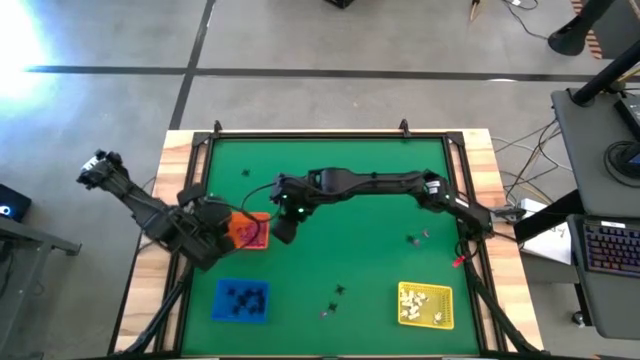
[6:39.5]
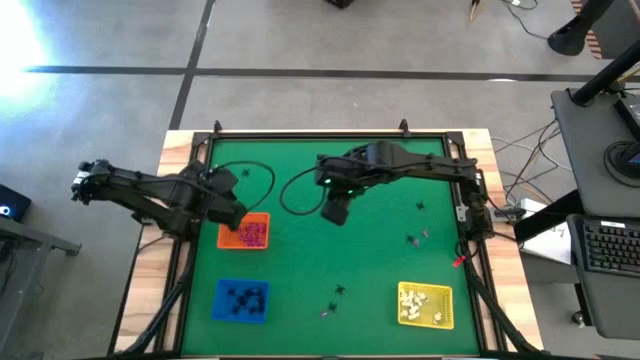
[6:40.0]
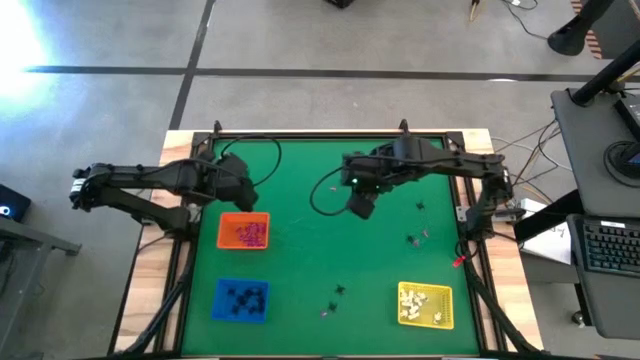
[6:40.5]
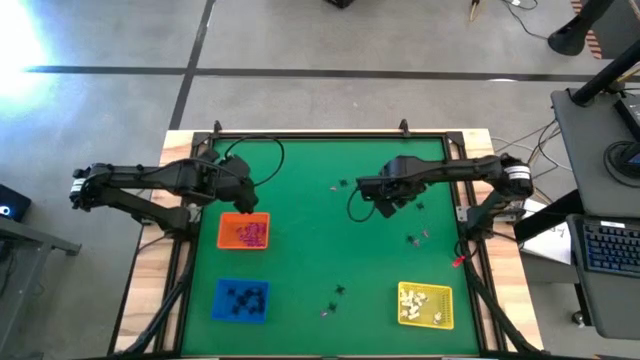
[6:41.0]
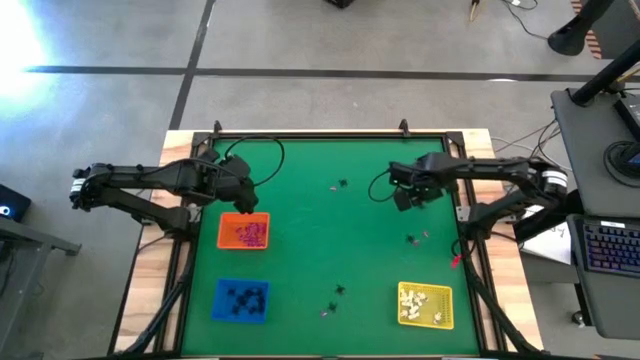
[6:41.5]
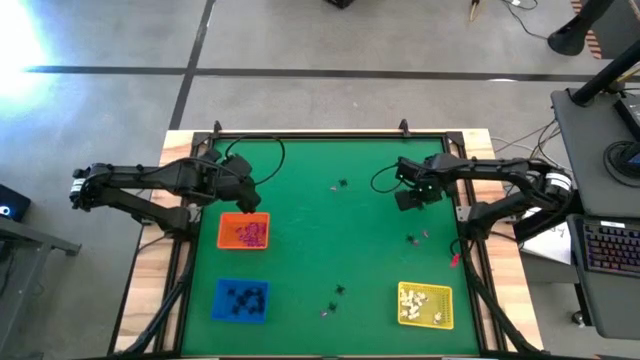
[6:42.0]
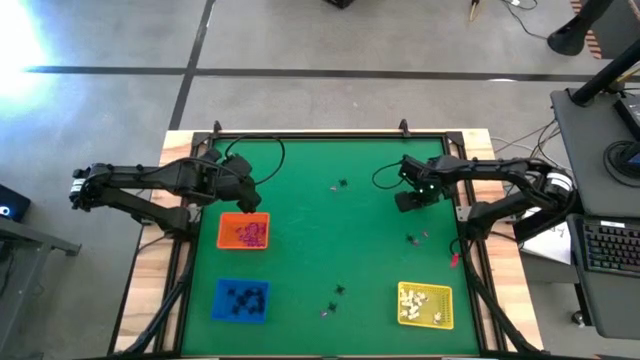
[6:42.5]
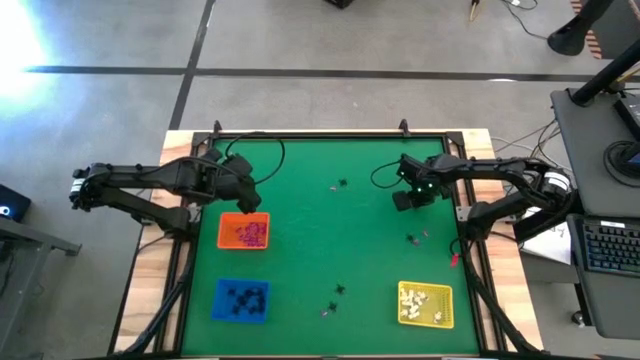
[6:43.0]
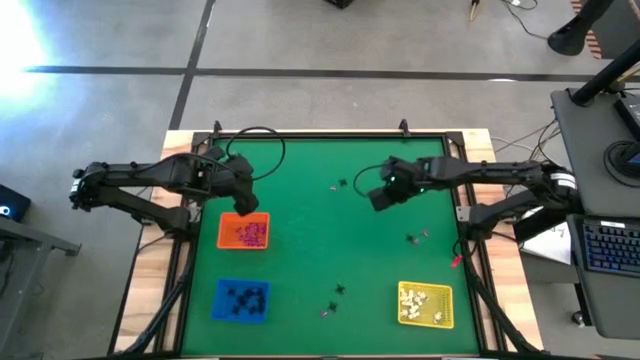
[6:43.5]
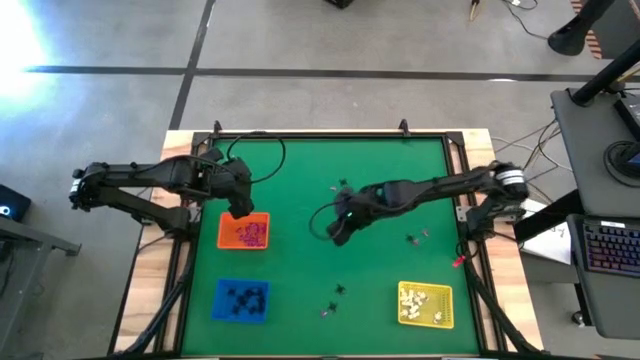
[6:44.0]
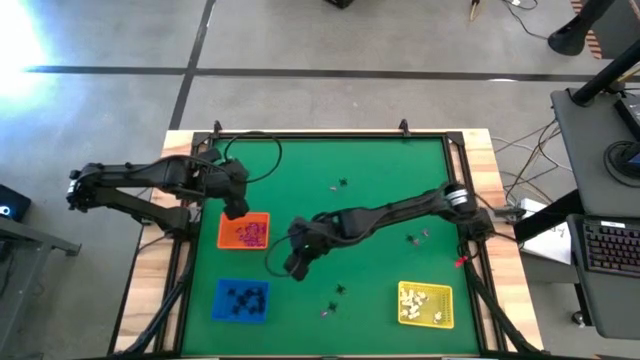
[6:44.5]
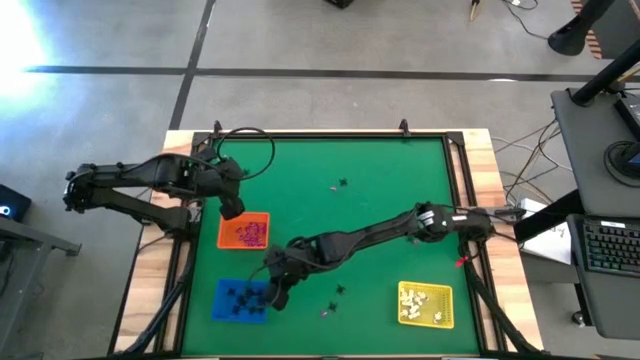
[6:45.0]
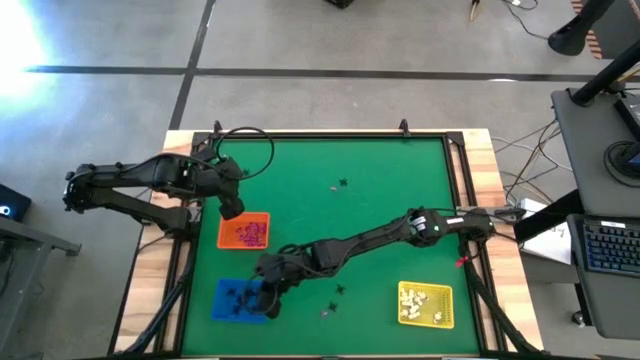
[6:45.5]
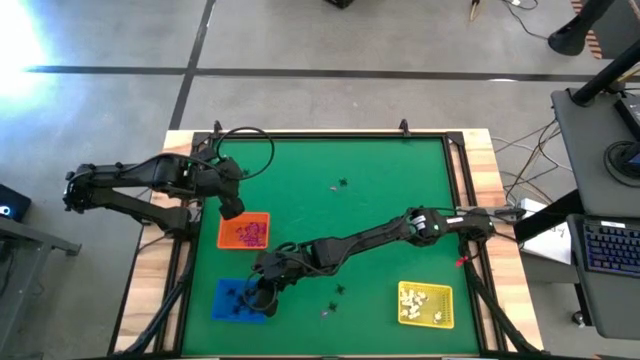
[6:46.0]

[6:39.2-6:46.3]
Task: Sort Halloween decoration
Put the black spider toy into the blue bin

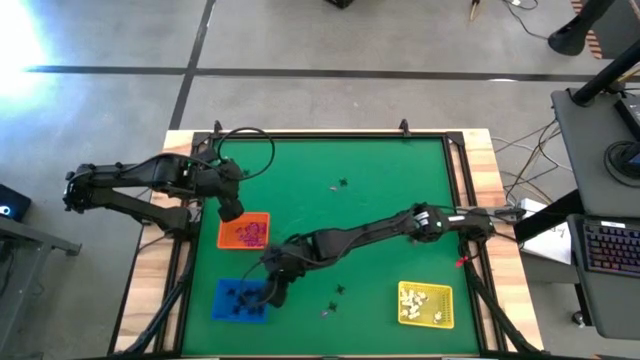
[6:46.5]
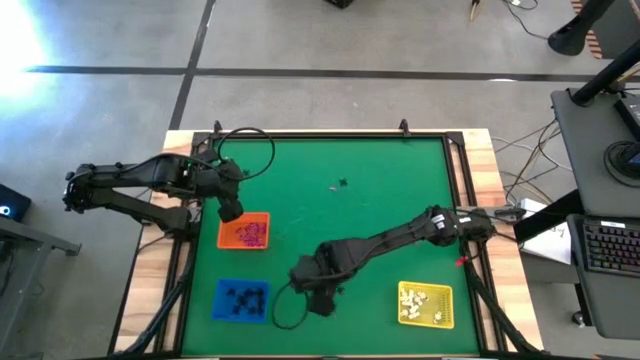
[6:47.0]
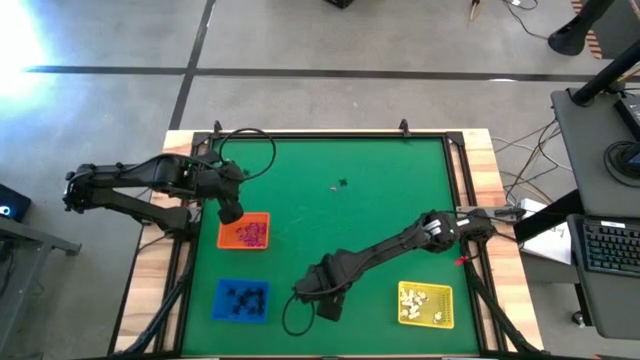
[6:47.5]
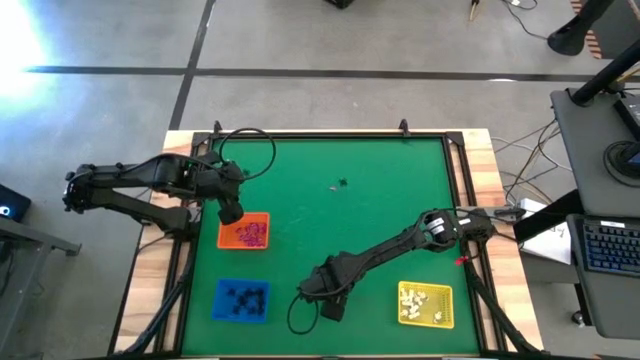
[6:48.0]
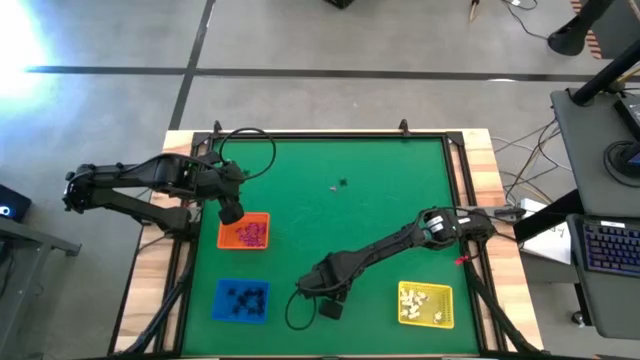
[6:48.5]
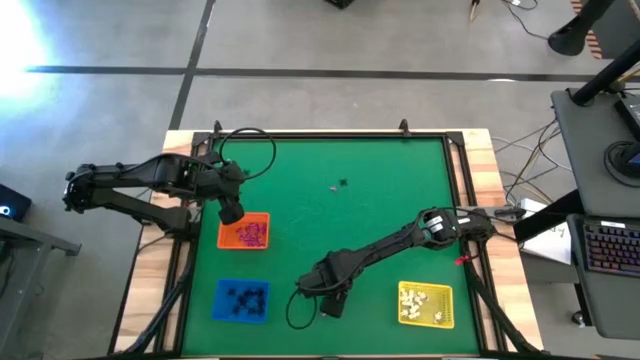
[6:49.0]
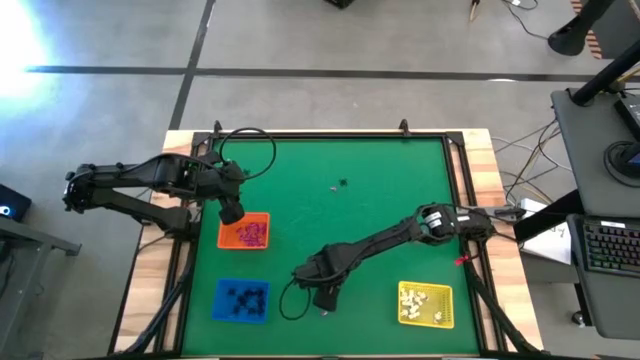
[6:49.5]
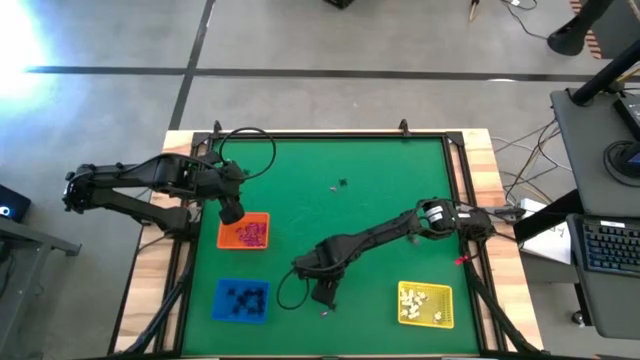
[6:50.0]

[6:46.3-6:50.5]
Put the black spider toy into the blue bin

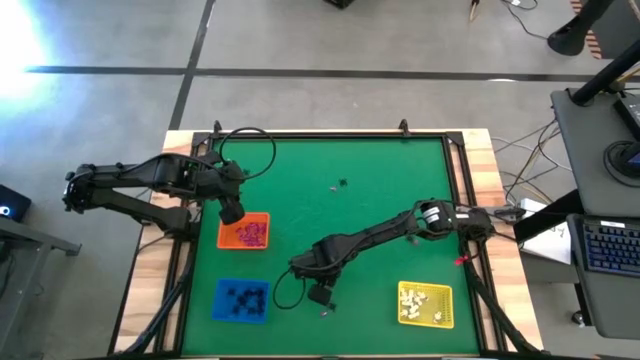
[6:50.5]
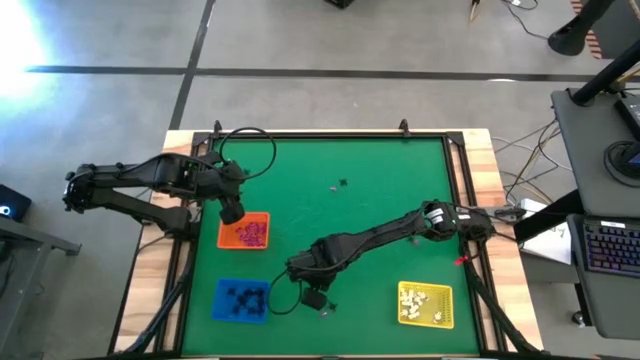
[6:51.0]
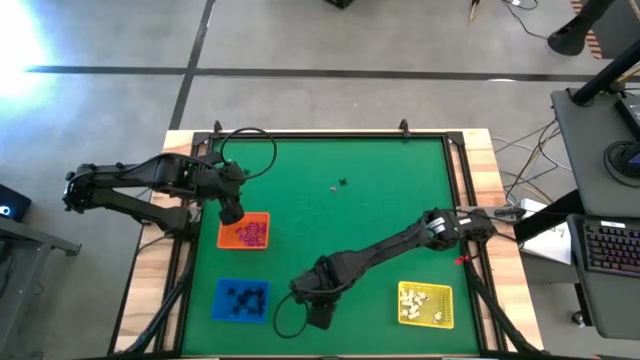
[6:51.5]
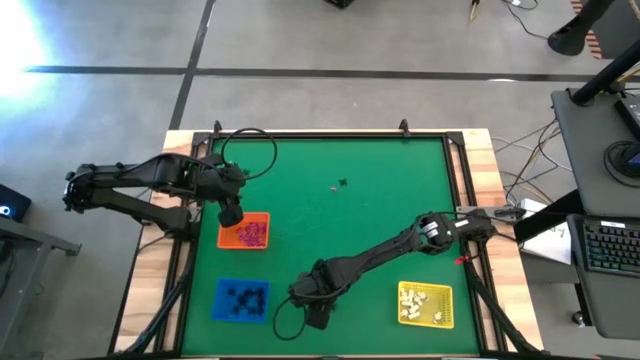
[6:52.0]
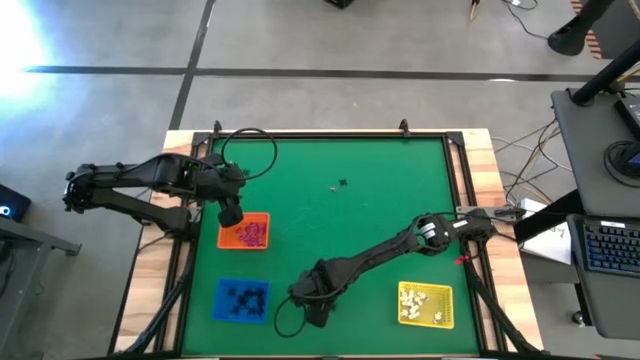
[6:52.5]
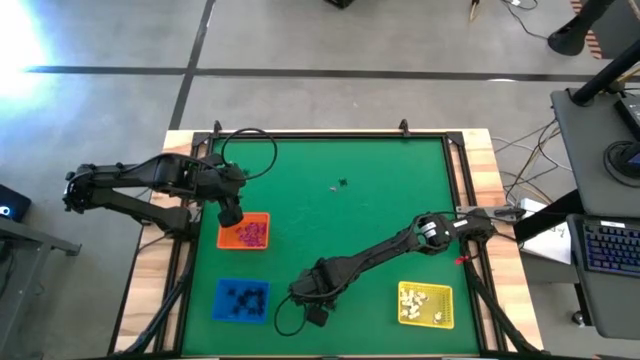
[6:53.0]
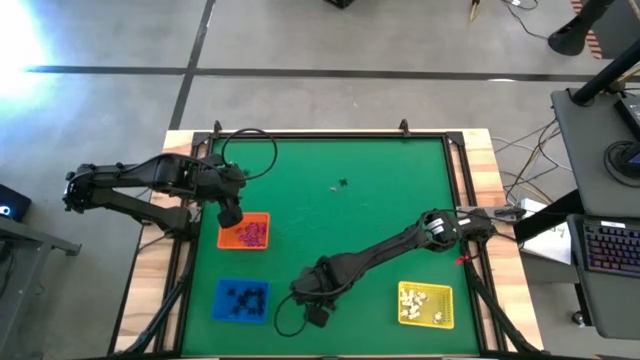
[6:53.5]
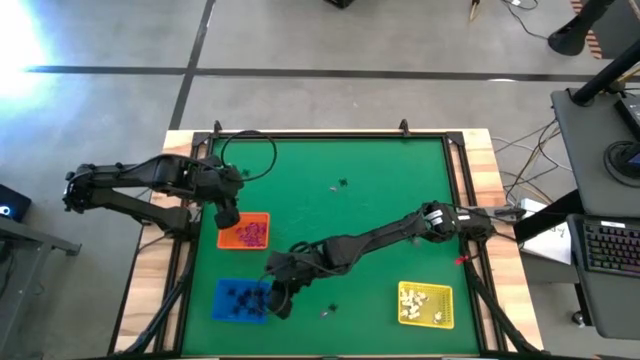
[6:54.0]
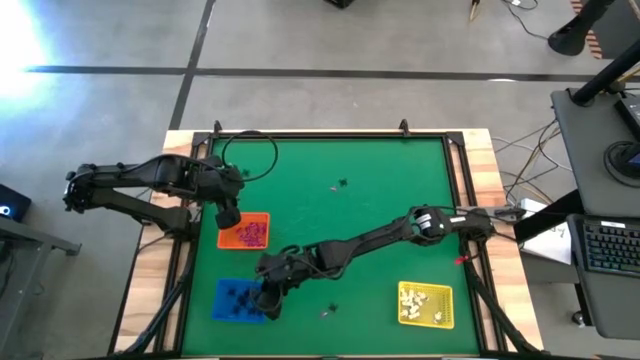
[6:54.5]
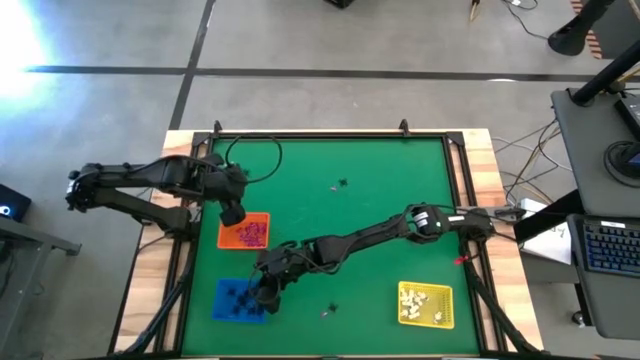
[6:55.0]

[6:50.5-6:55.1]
Put the black spider toy into the blue bin

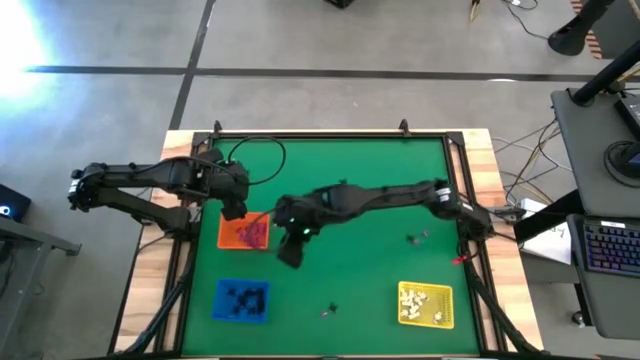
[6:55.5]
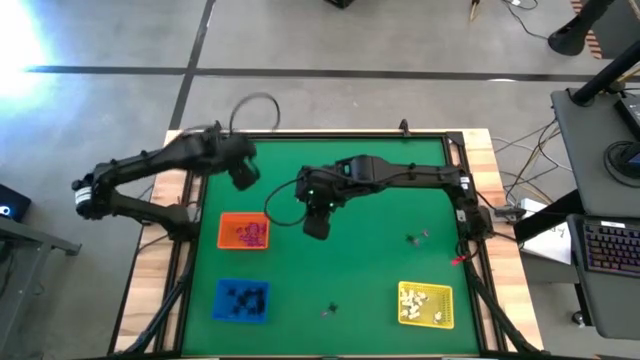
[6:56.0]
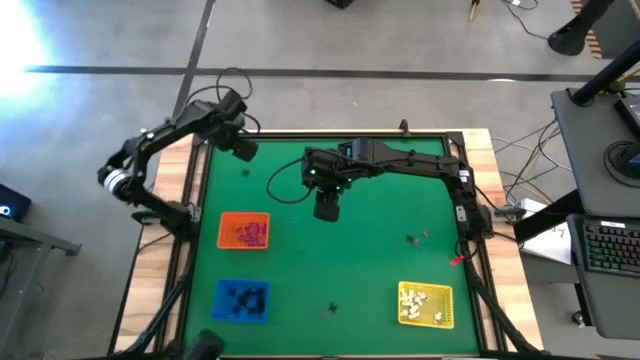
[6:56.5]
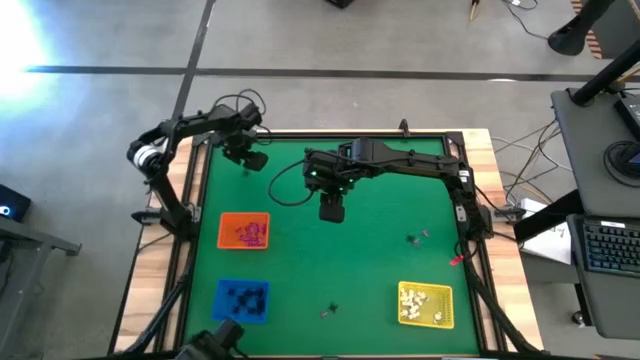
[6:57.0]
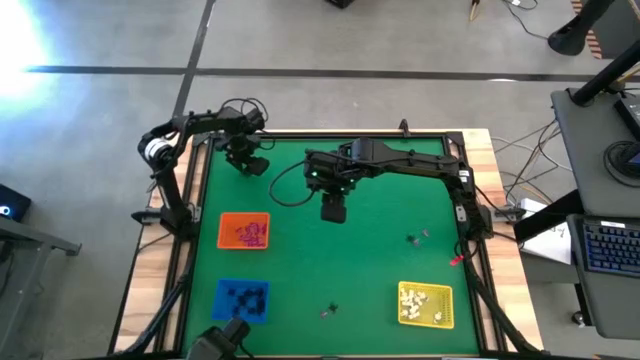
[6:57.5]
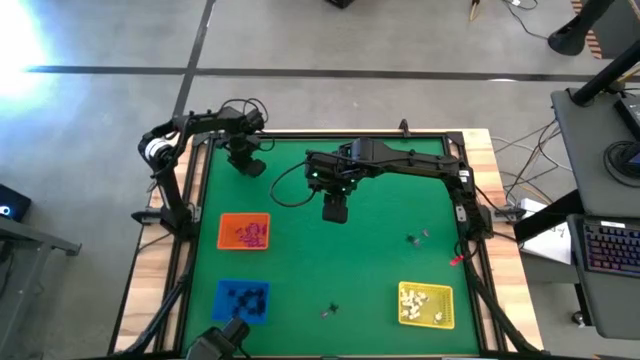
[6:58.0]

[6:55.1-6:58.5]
Put the black spider toy into the blue bin

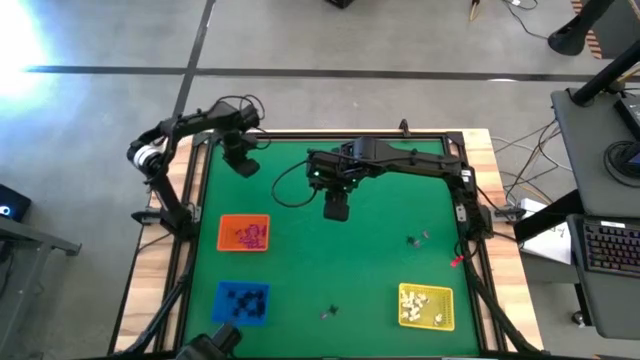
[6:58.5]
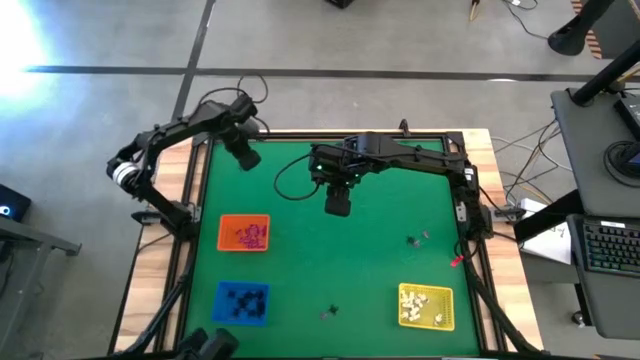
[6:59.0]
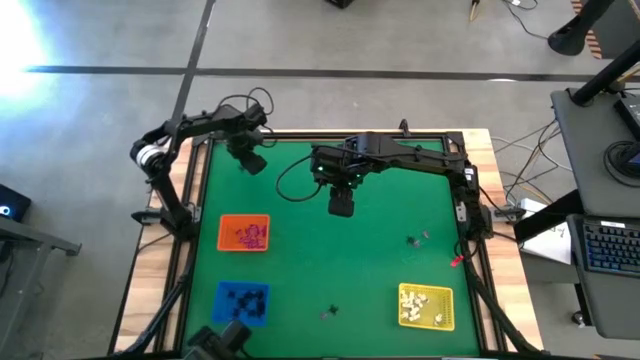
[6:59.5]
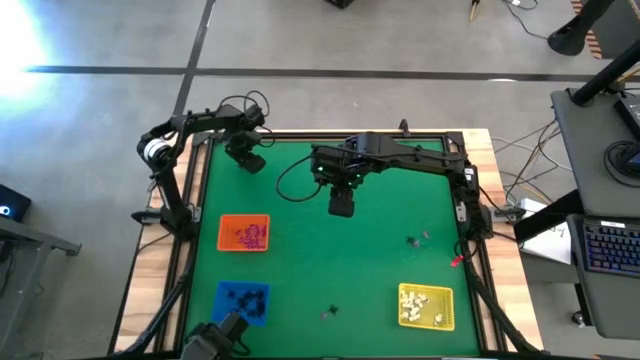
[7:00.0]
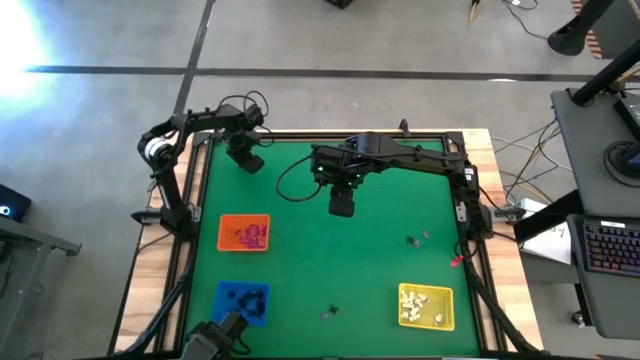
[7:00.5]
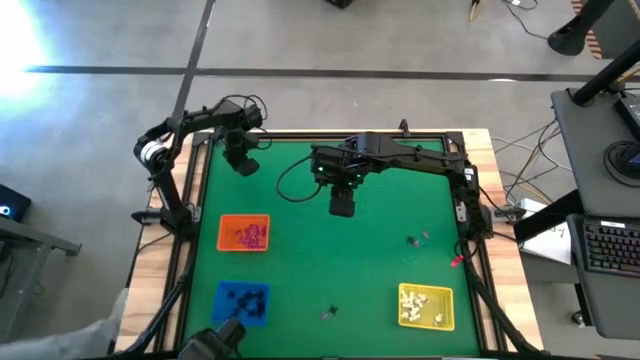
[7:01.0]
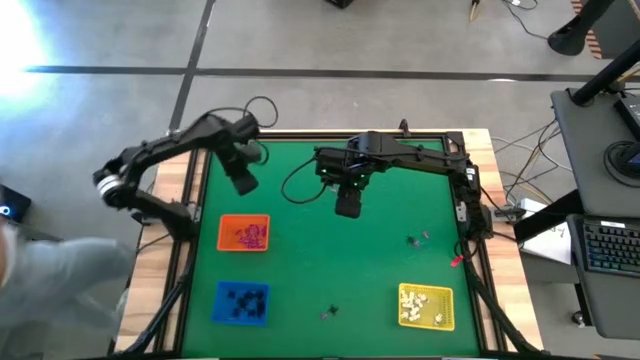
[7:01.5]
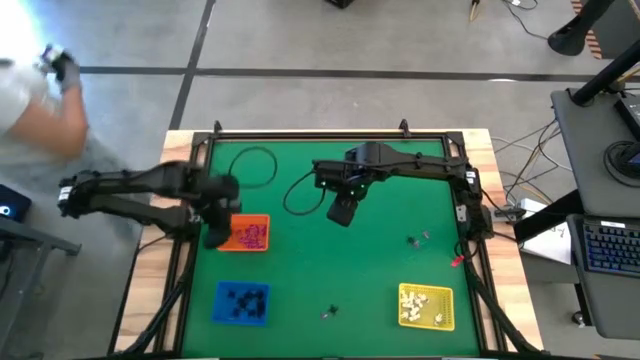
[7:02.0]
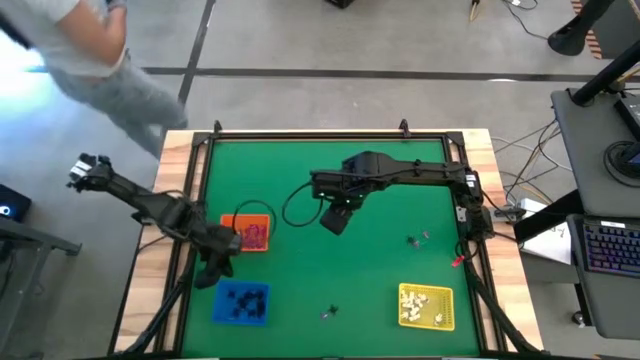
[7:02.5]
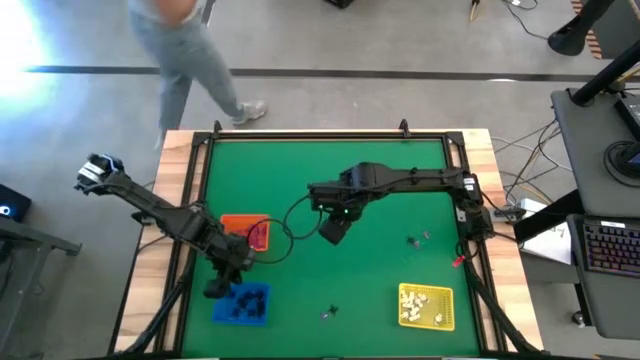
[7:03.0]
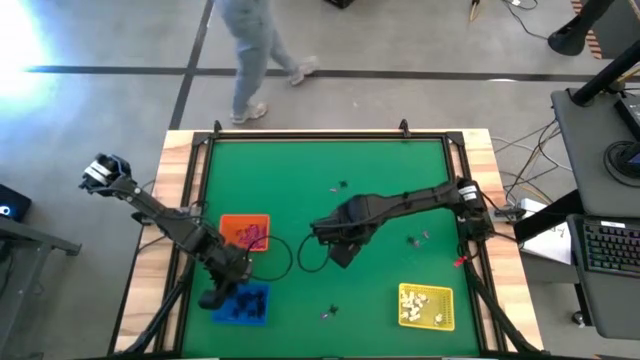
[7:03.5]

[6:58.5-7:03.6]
Put the black spider toy into the blue bin
